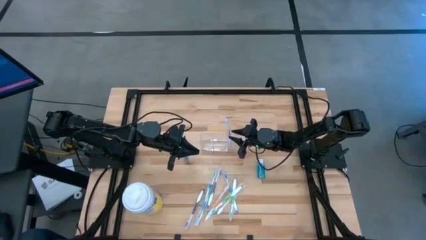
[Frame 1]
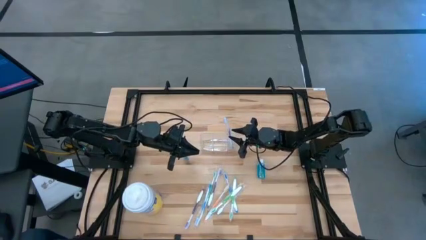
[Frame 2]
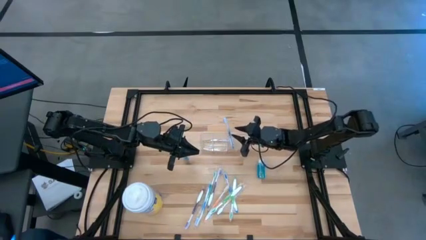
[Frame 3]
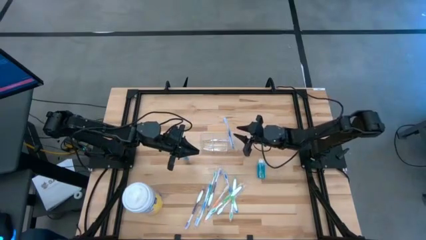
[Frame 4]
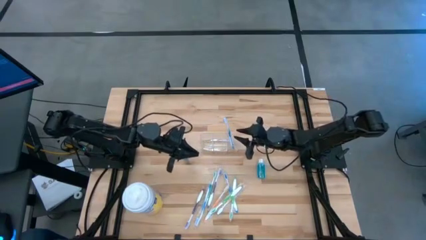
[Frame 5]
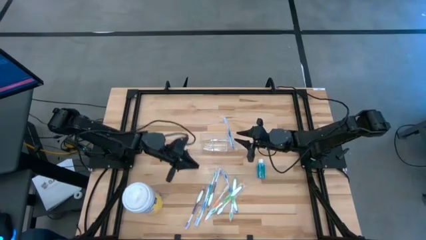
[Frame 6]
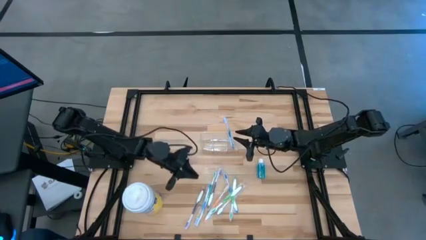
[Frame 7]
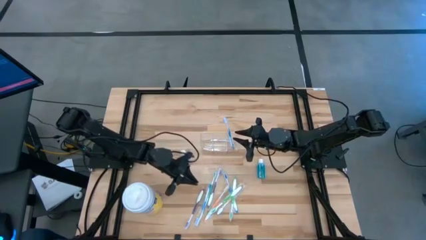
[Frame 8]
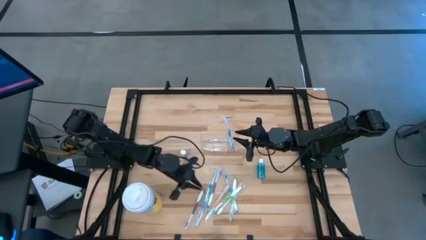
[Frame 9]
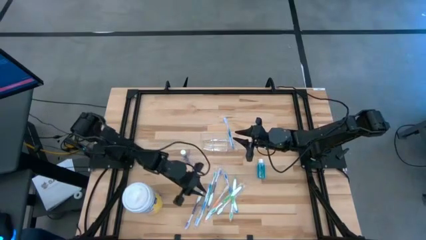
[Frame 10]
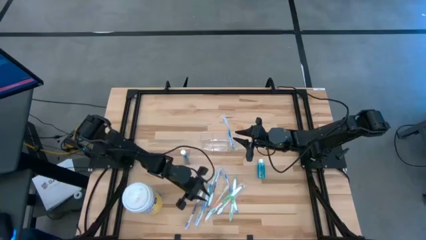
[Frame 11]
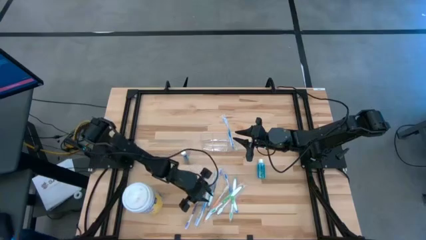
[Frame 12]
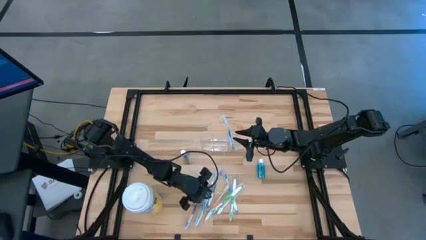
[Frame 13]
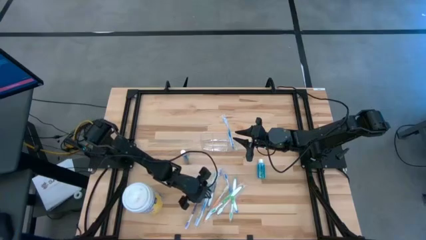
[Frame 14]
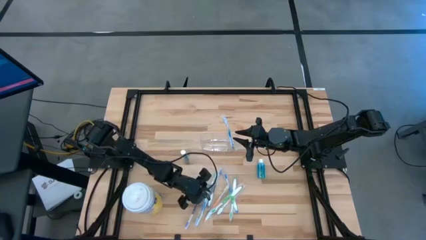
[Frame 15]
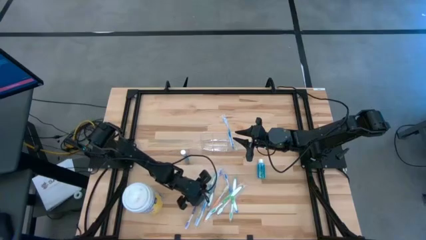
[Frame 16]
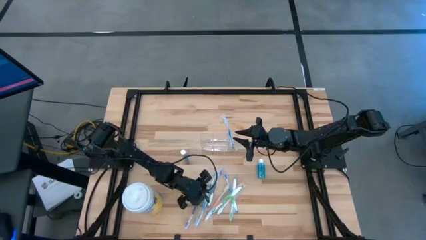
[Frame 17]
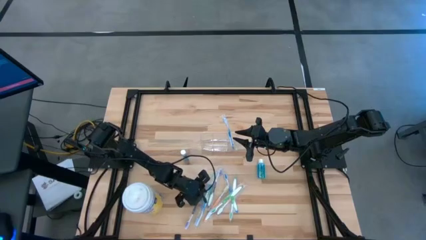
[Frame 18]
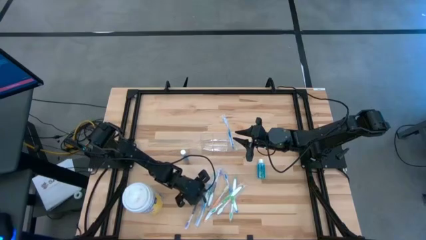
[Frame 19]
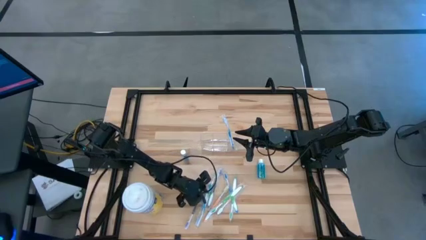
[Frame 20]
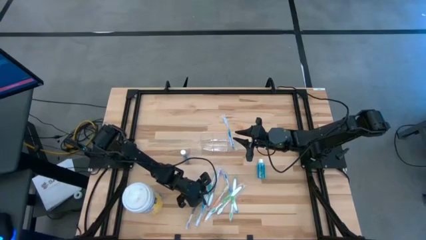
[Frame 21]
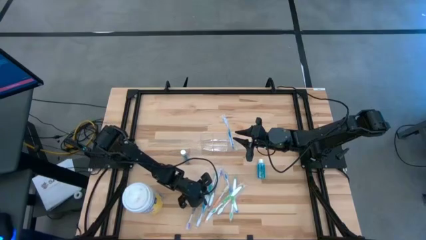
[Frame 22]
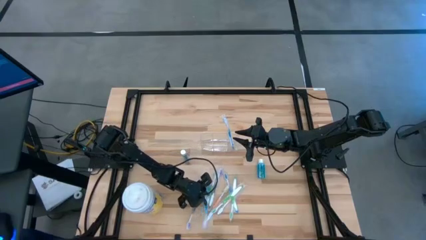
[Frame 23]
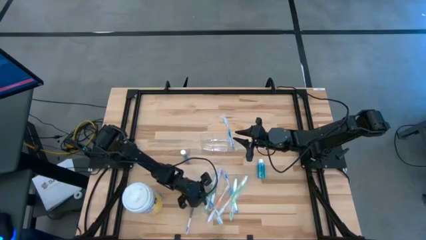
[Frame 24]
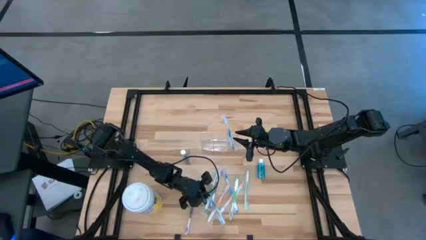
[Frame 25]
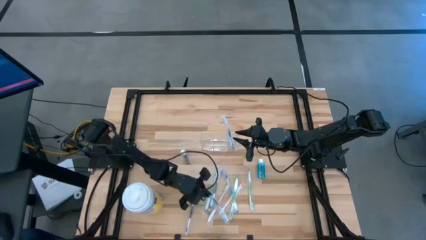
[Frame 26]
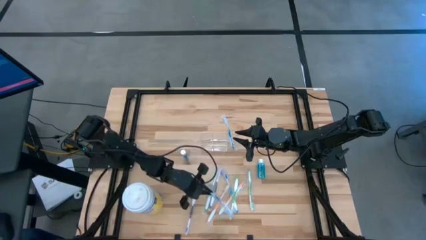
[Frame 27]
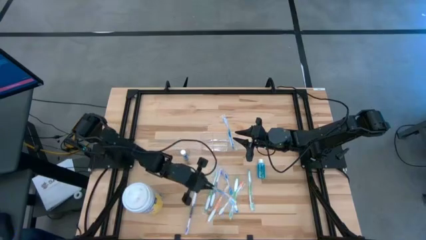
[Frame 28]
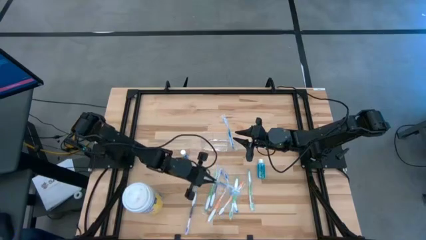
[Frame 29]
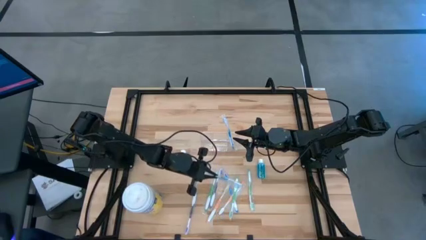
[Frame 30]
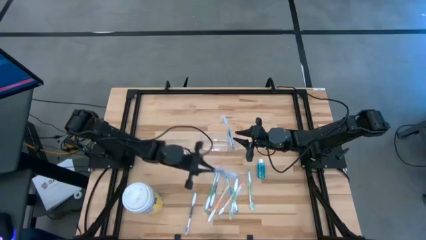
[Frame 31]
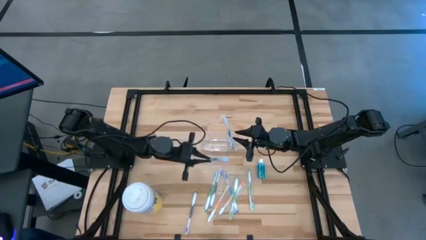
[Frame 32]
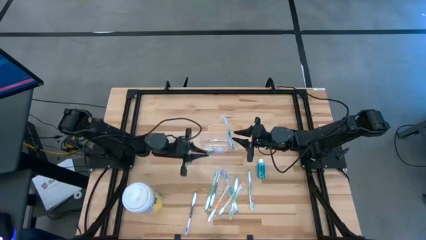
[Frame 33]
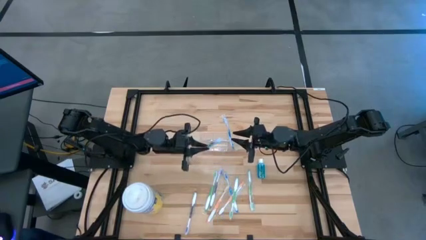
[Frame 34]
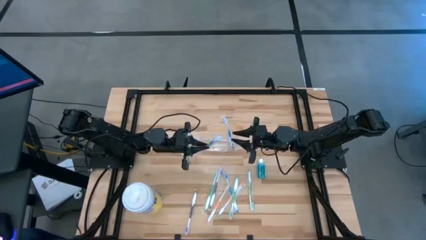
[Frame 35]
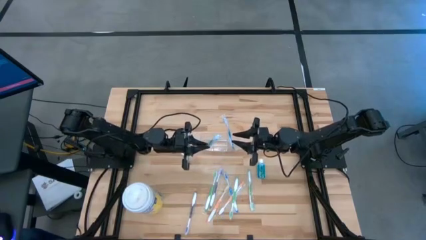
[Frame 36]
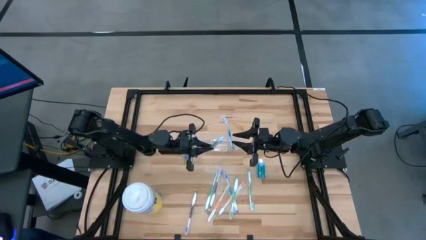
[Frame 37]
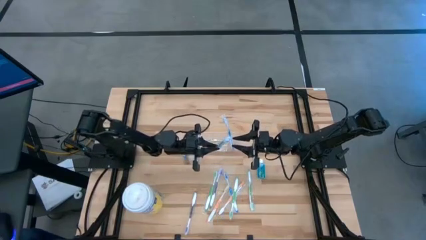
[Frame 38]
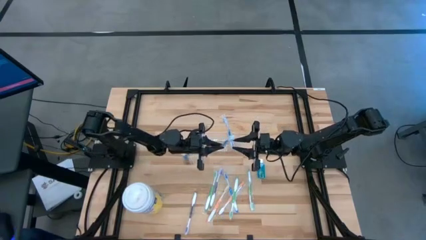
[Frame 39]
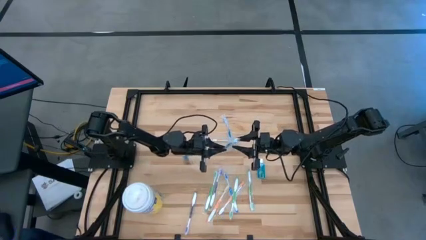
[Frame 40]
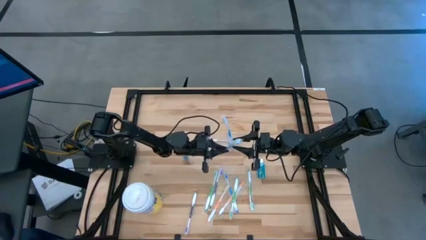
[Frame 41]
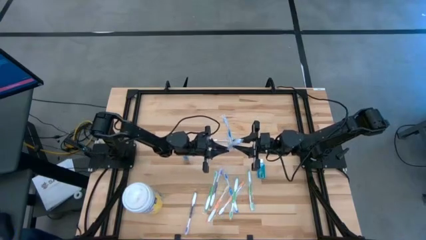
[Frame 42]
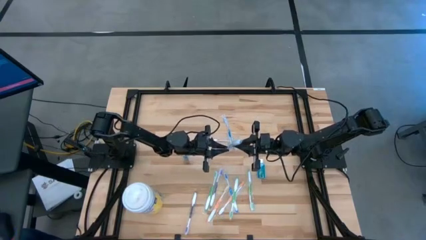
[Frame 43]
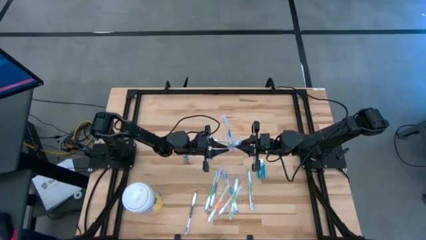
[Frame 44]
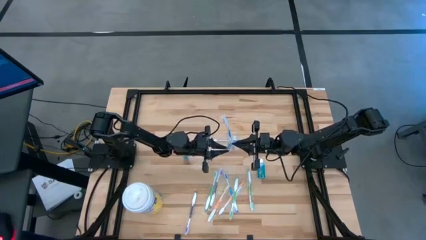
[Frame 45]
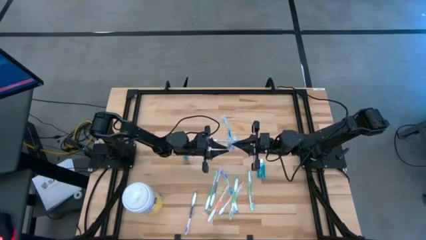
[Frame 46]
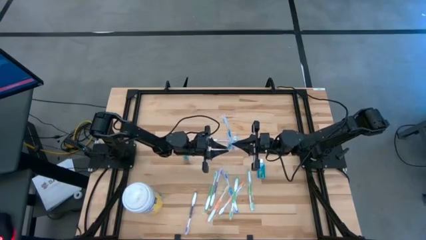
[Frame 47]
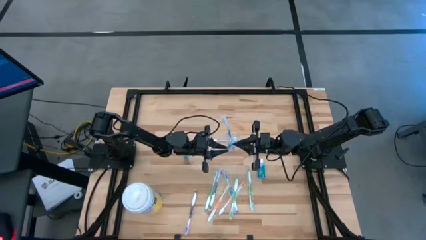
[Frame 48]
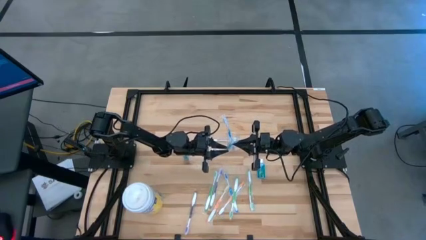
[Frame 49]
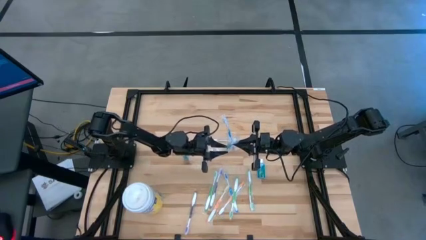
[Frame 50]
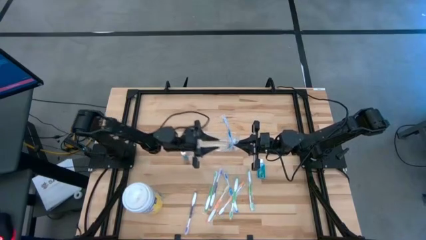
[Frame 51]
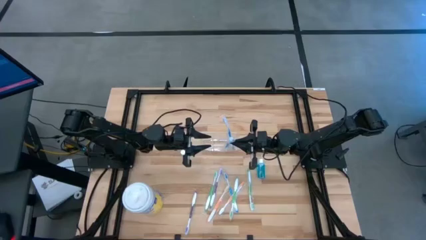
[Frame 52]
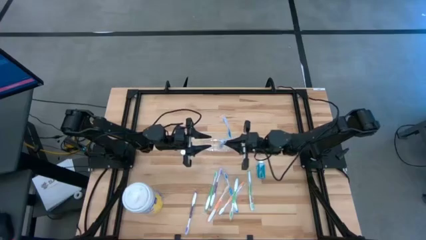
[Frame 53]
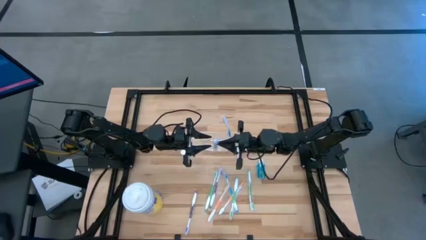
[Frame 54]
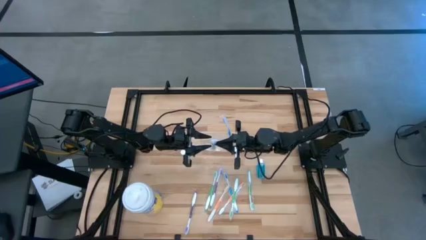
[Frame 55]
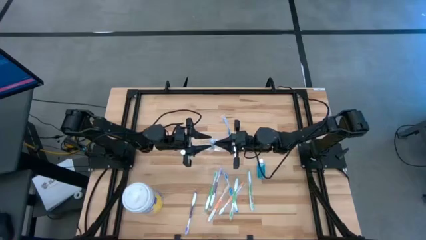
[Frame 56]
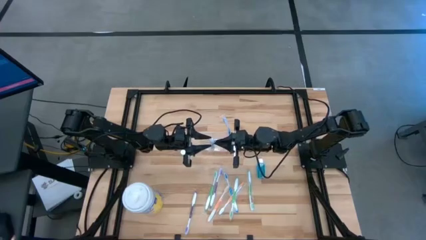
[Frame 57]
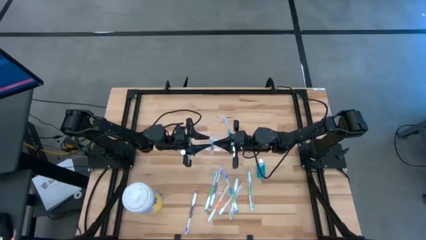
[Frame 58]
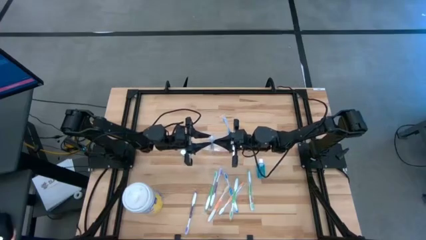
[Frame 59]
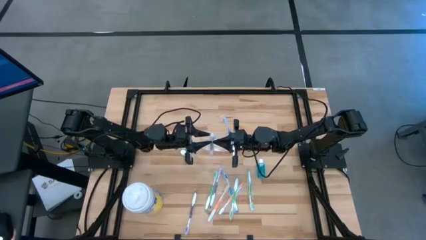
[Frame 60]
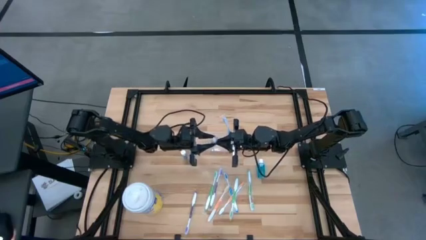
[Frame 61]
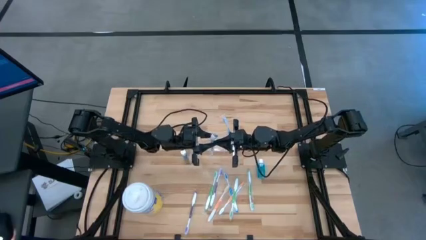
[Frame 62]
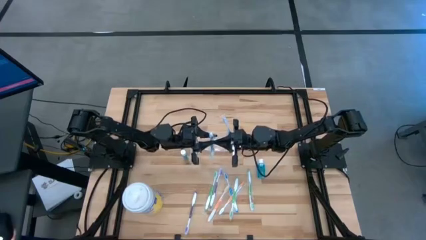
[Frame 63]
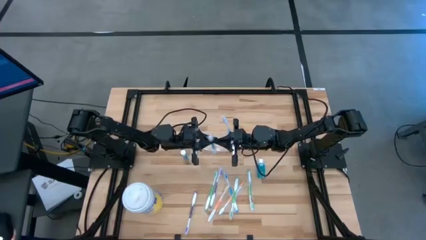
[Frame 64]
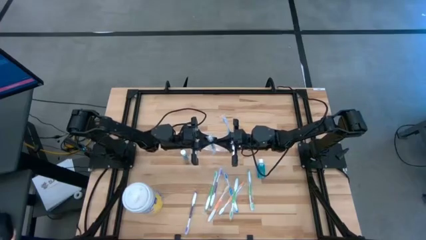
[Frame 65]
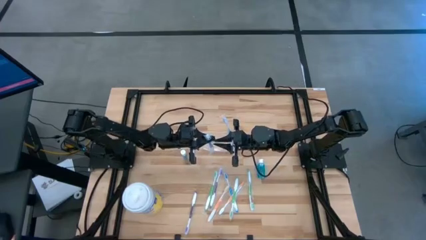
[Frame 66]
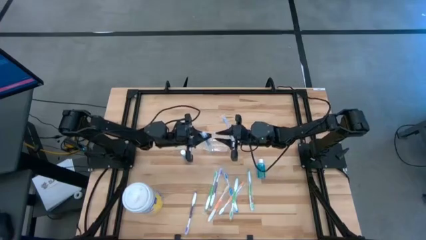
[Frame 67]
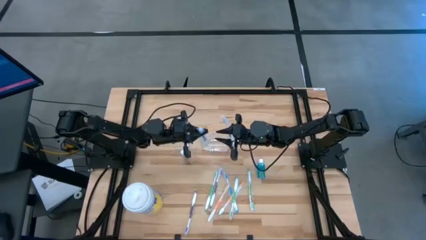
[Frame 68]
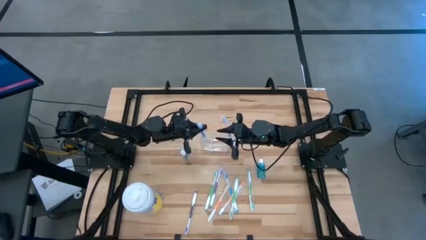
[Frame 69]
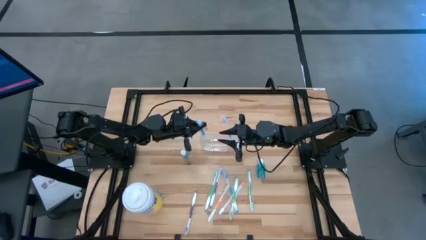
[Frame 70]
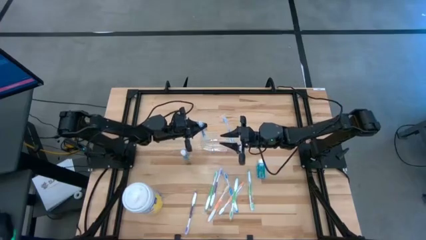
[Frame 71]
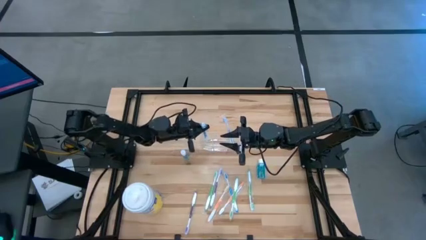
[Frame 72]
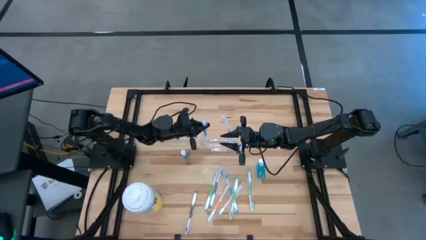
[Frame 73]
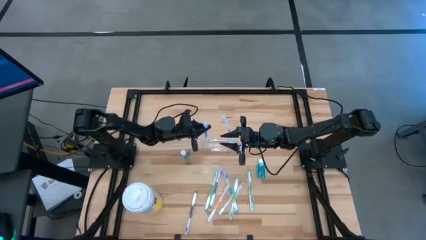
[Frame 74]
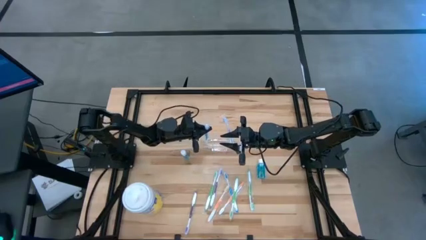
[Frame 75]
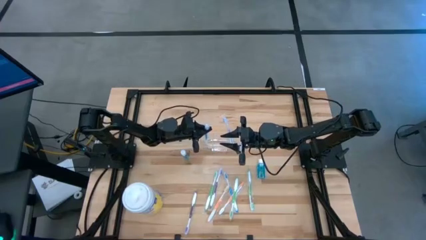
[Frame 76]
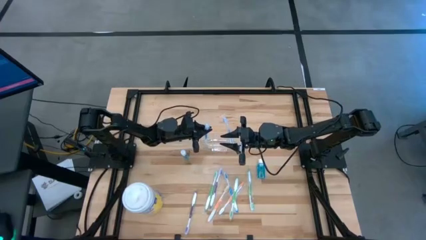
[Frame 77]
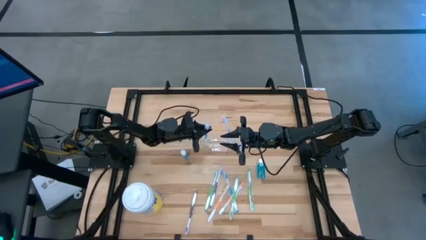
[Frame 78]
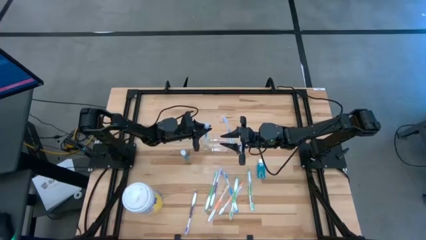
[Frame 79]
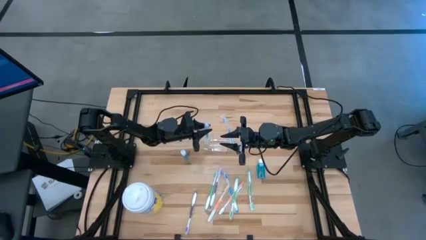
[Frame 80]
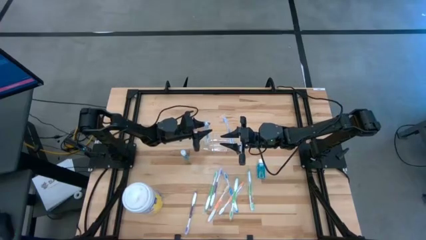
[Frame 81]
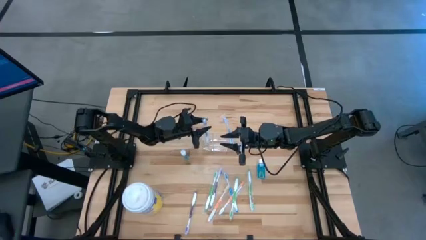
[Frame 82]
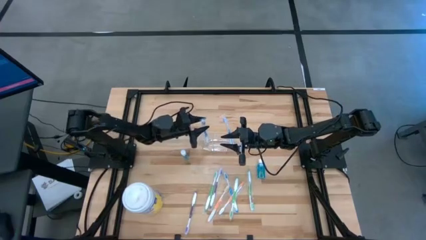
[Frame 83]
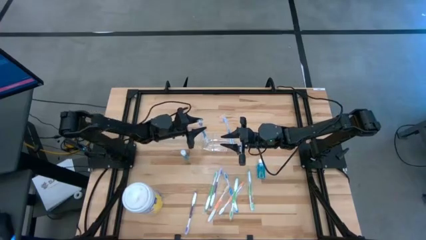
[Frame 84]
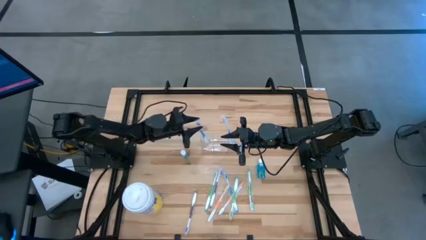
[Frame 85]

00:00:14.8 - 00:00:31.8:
Task: Pick & Place toothbrushing station
Put the blue toothbrush into the transparent organizer
